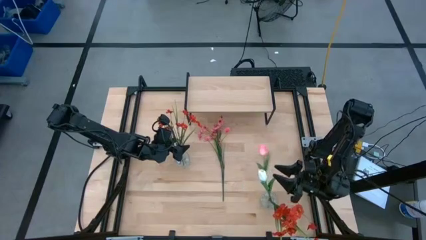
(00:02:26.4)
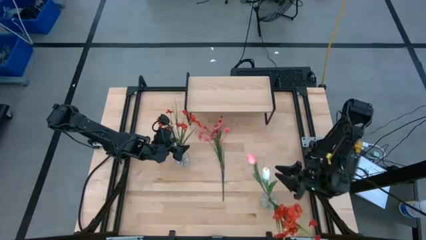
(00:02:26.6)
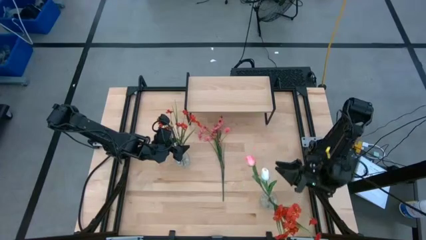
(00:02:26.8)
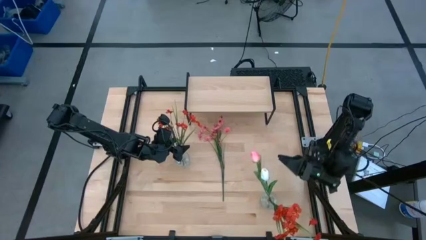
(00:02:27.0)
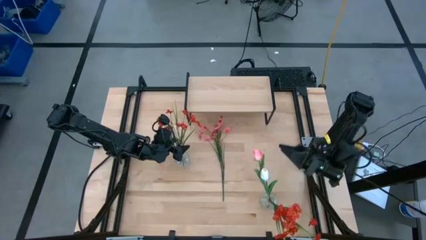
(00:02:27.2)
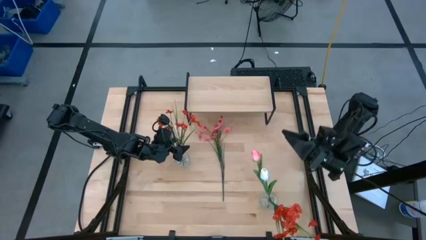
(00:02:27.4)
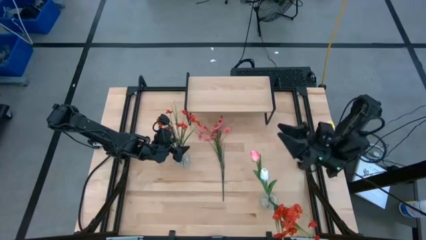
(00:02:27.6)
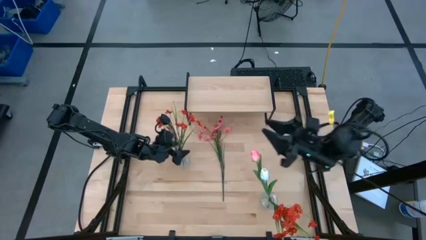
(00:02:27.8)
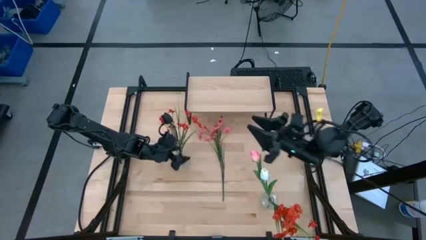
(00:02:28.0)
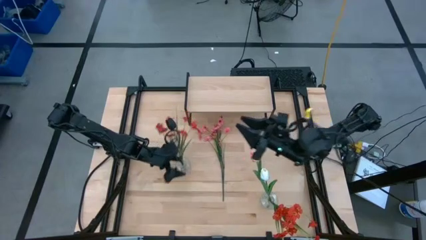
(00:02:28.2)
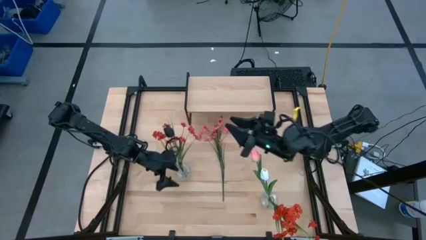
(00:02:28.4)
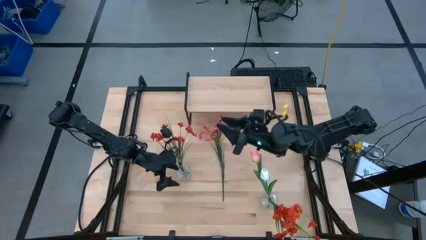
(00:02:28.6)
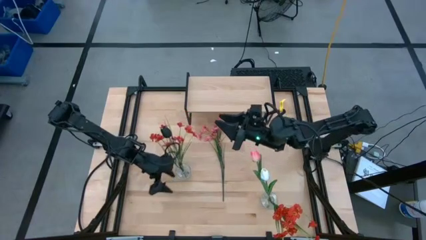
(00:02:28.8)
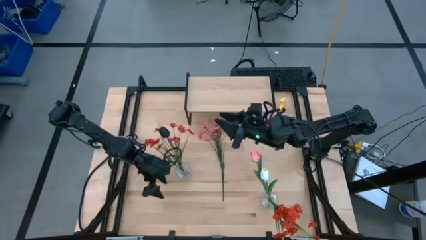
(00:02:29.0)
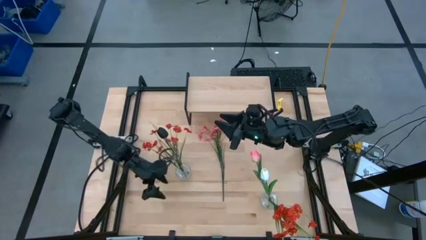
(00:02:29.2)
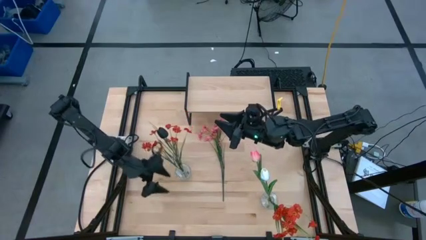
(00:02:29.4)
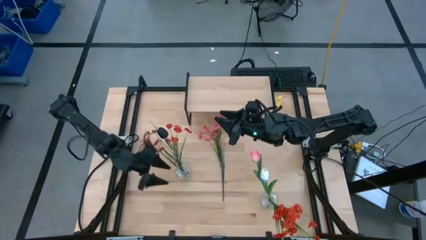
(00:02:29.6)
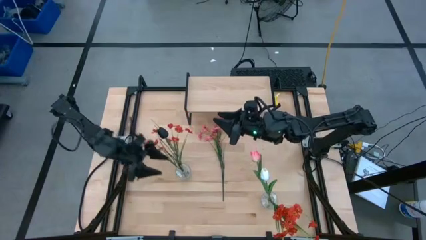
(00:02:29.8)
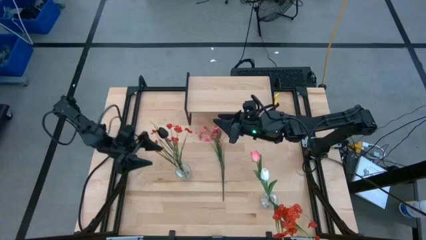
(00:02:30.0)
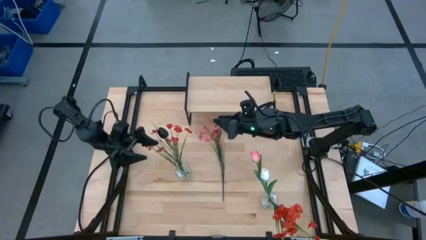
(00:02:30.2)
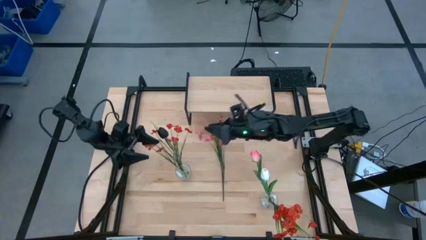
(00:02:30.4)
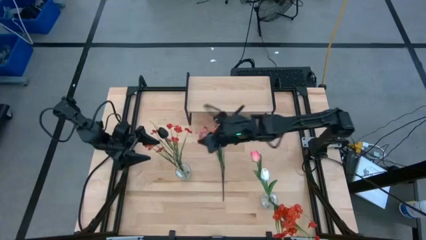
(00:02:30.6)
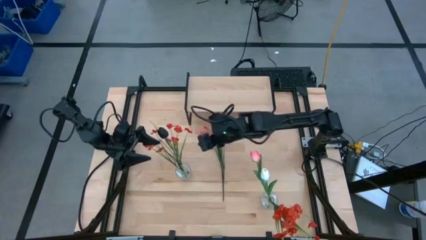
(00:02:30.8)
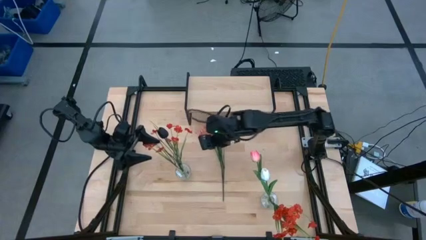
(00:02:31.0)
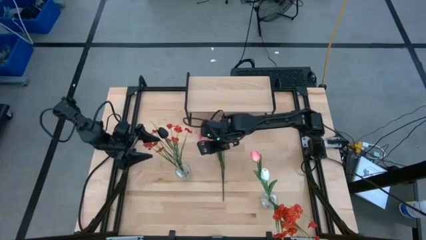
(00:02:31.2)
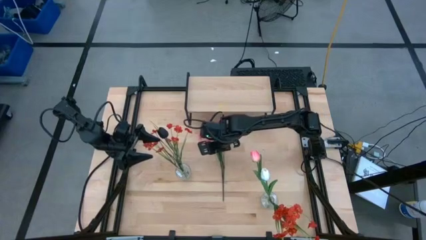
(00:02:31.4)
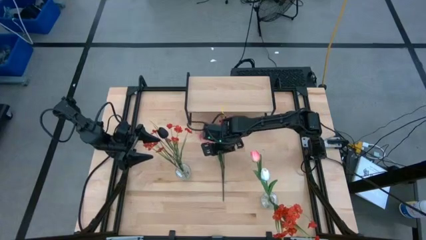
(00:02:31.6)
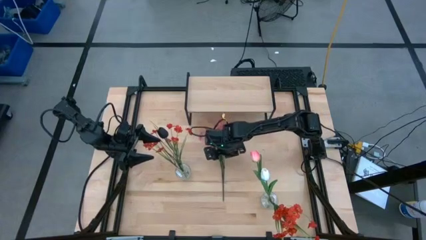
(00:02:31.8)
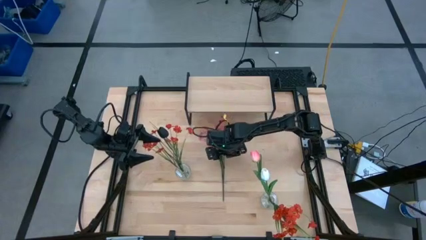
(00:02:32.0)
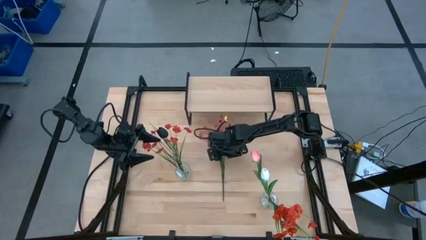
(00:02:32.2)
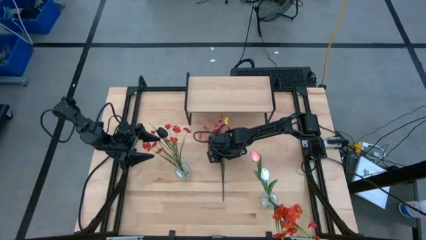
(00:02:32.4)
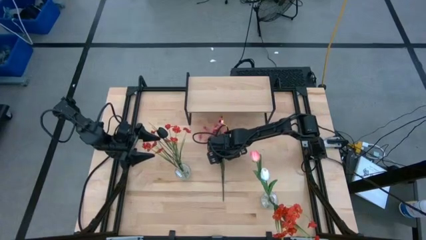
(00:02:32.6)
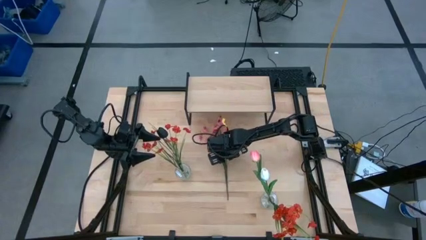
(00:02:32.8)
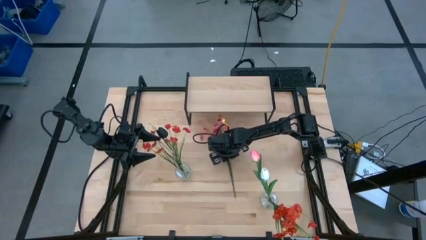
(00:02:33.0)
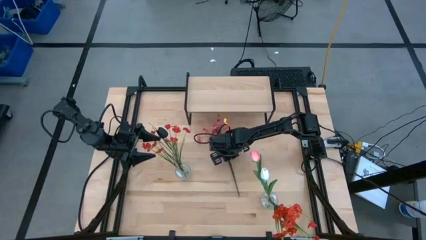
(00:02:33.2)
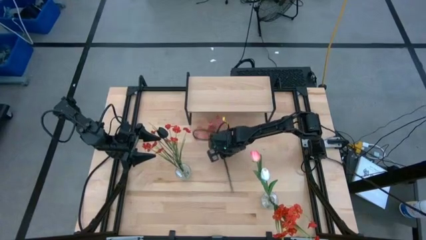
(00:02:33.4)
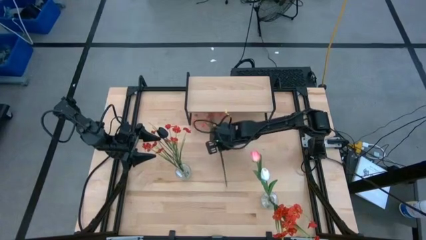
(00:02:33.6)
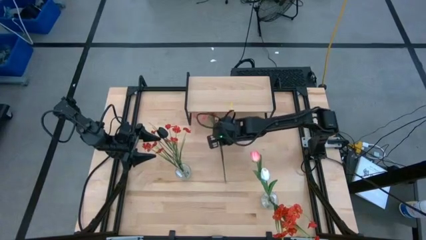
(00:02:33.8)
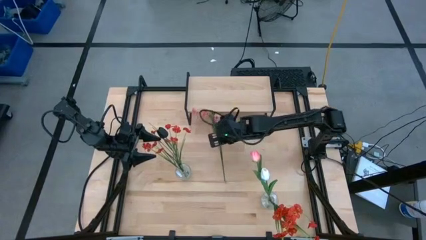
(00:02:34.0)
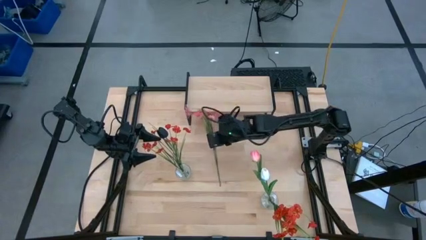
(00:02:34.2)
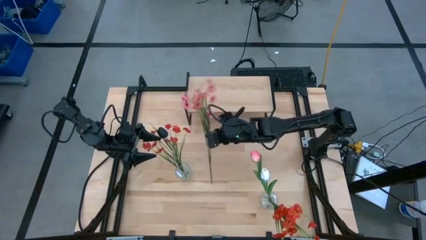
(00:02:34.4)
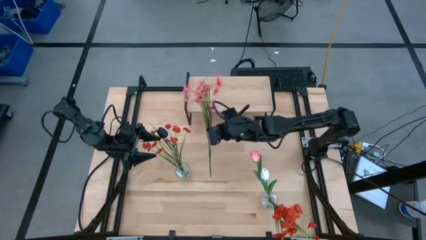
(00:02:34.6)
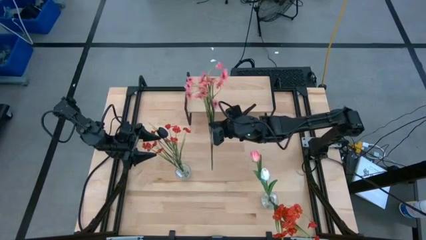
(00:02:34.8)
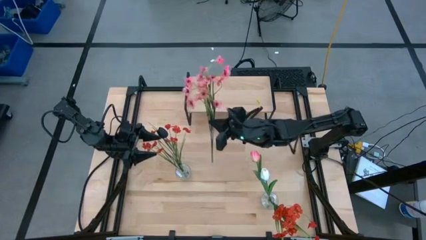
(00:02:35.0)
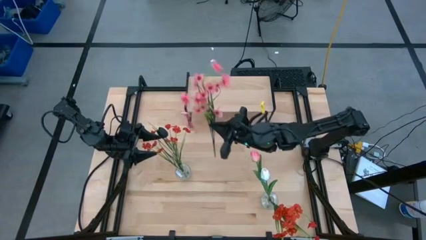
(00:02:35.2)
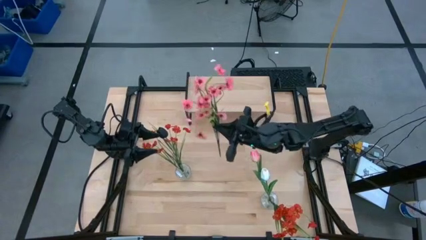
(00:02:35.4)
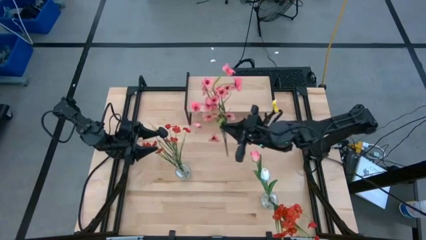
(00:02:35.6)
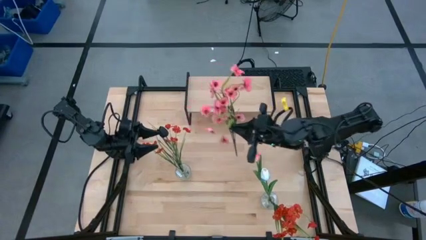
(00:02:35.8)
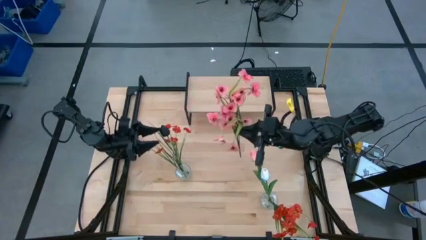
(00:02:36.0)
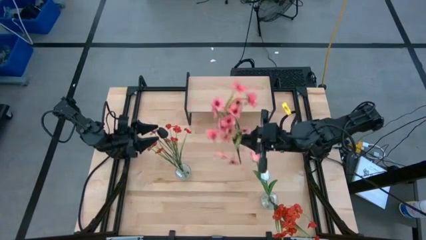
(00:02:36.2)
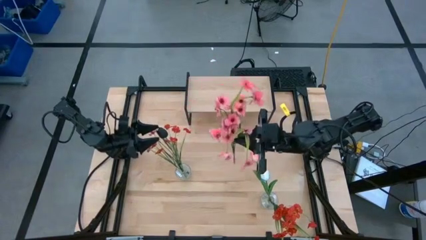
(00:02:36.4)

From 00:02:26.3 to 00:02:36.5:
Task: Pick and place flowers into a vace then onto a shelf
Put the pink flowers into the right transparent vase

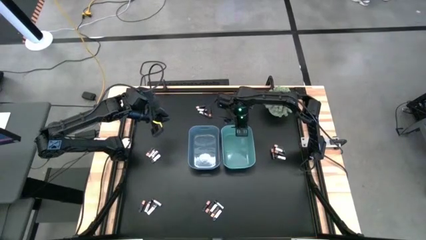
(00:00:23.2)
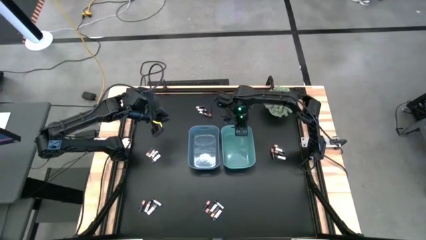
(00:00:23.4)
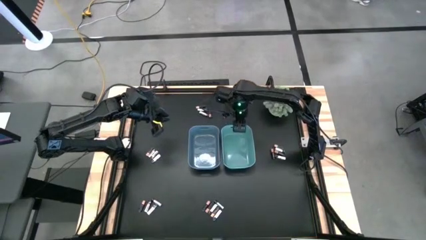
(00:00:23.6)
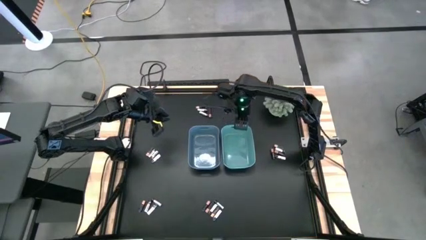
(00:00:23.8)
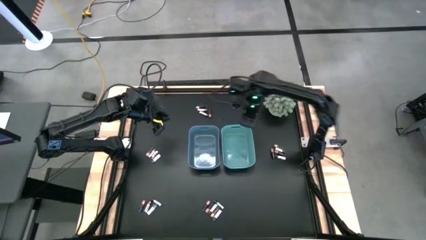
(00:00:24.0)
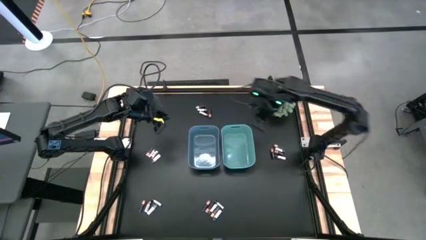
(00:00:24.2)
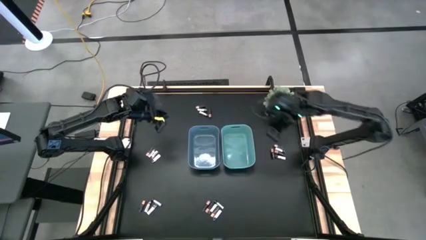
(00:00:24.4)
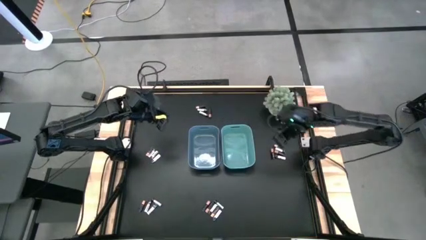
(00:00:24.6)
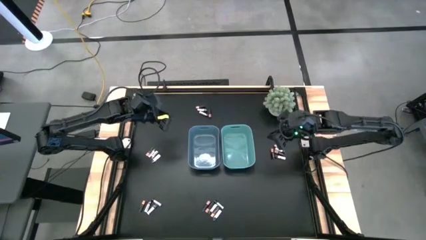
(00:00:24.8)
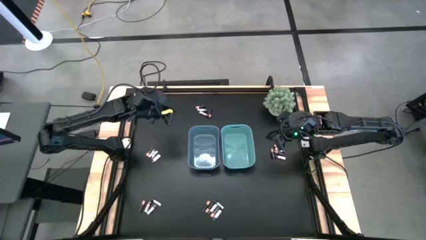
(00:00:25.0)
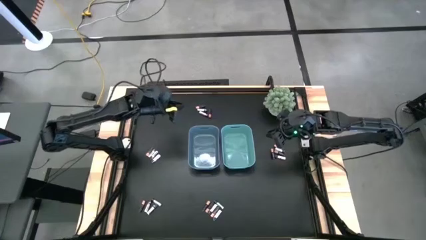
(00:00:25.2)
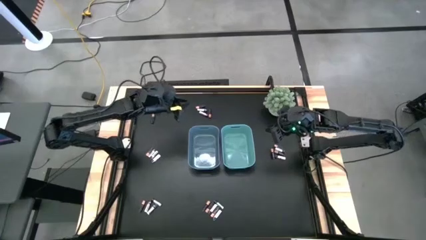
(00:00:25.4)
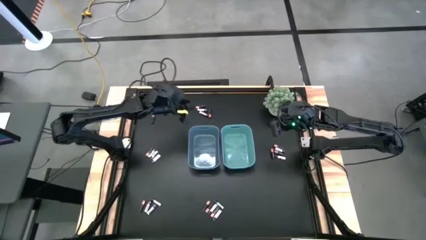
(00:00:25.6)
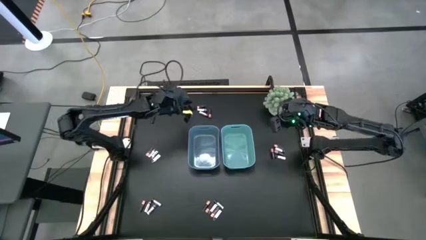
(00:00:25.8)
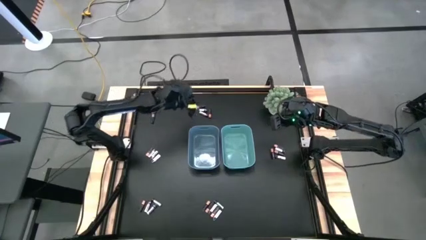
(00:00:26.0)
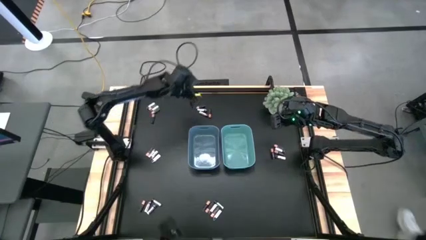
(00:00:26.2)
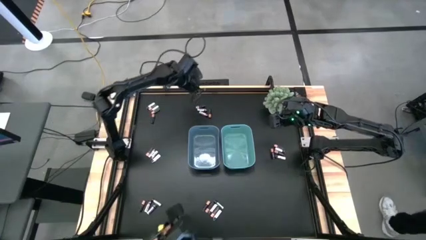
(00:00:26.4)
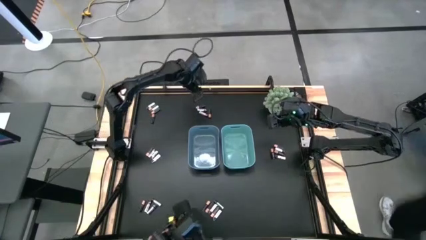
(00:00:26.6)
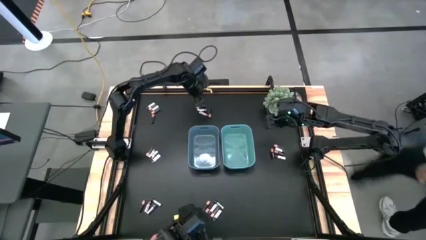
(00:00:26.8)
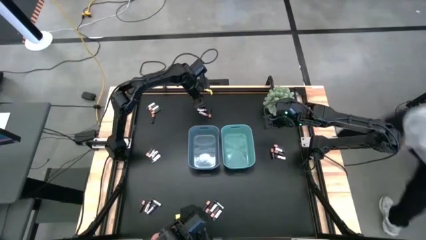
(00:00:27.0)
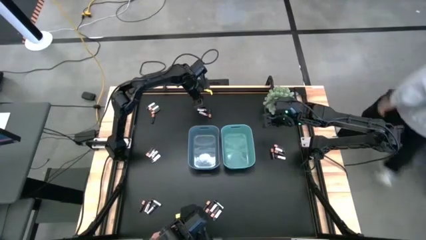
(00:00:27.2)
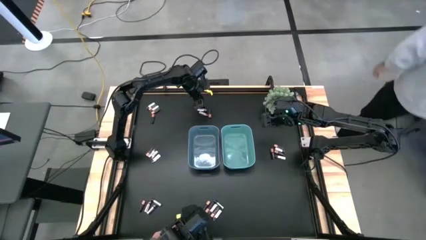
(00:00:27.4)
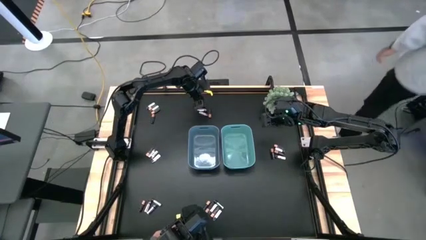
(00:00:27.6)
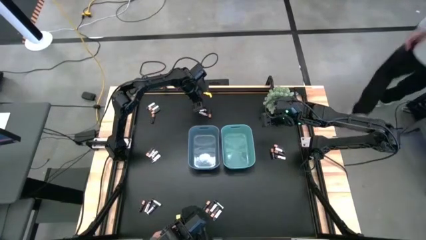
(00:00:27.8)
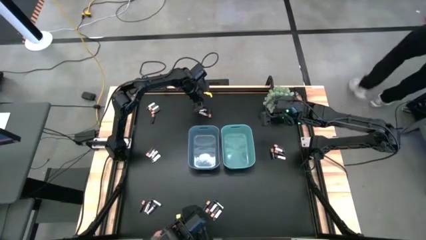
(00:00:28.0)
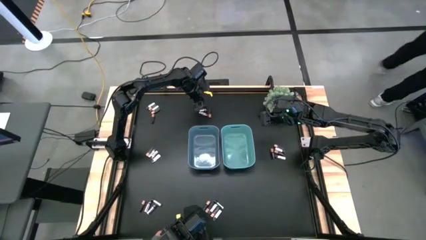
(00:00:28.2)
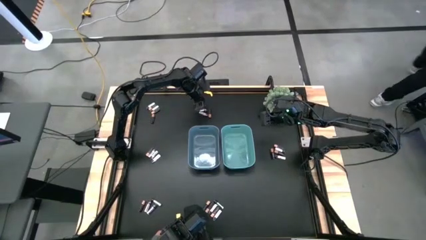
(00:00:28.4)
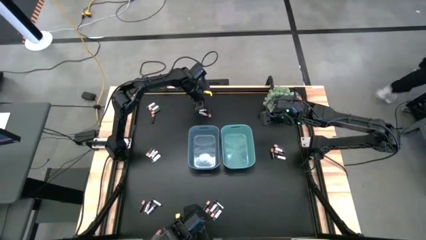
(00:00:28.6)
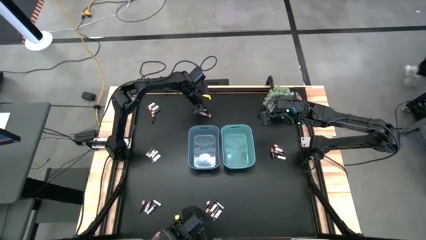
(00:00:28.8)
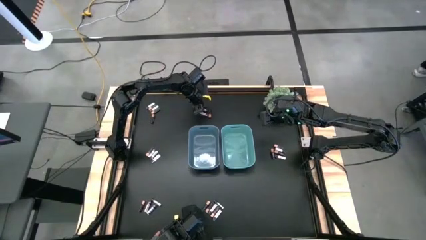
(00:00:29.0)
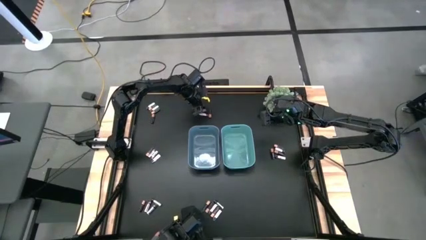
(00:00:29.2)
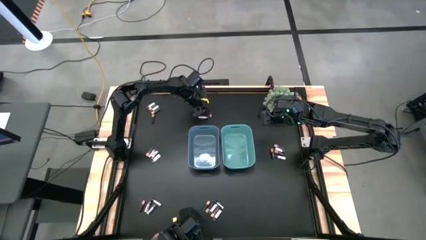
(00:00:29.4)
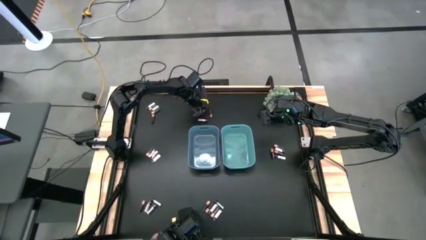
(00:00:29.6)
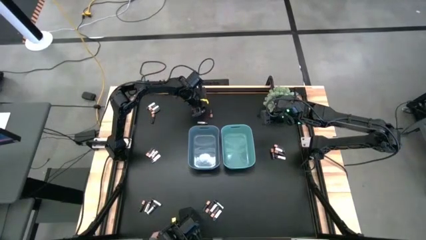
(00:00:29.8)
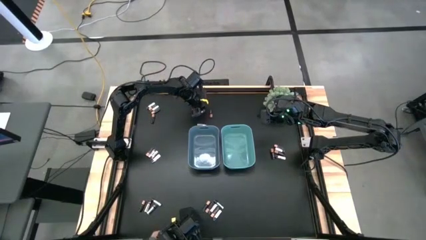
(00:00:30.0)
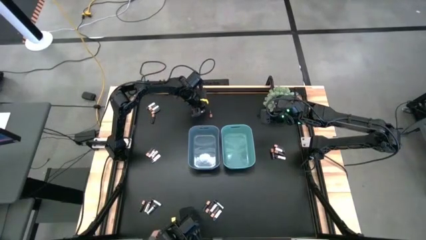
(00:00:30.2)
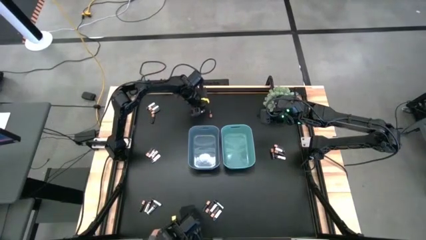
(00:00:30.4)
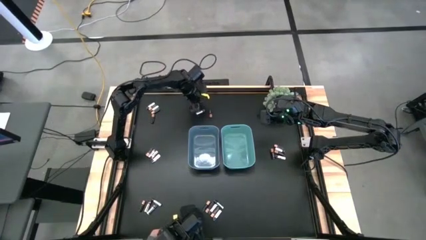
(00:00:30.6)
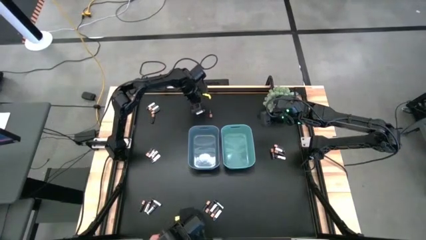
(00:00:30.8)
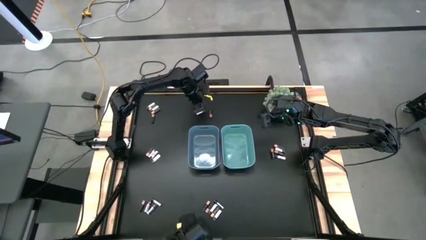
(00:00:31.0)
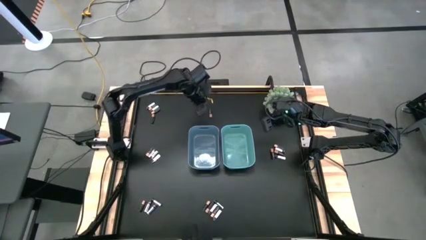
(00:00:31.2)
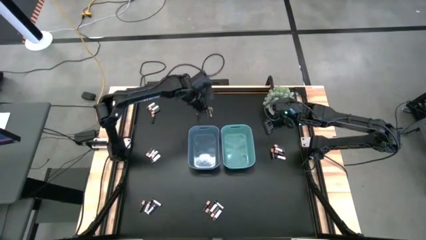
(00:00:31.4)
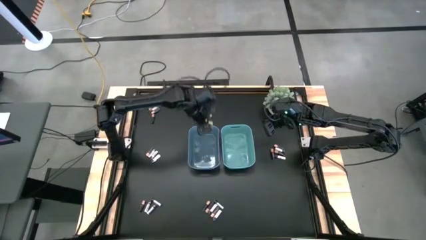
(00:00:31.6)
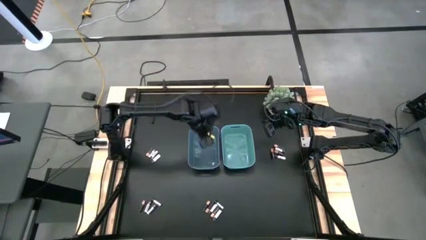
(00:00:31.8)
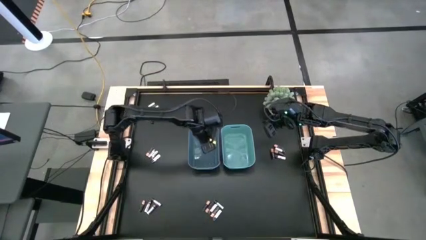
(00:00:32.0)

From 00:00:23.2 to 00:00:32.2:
Task: Sort batteries
Put the black battery into the blue bin
